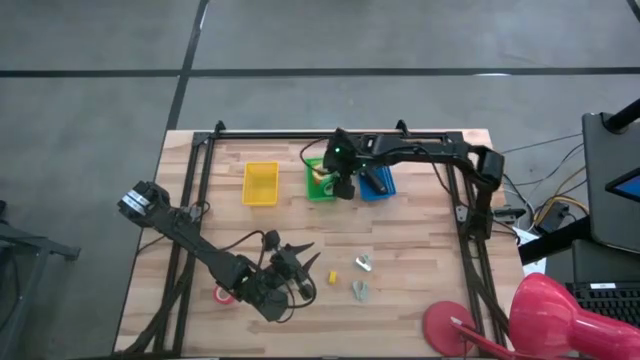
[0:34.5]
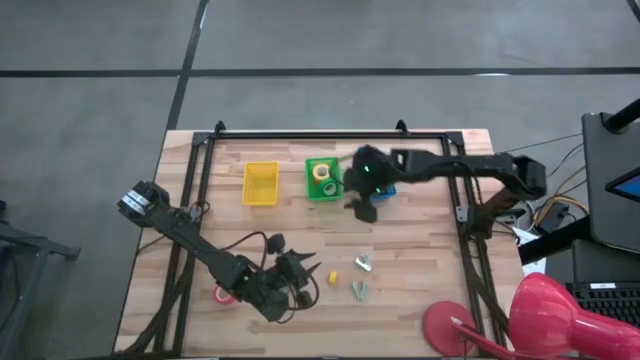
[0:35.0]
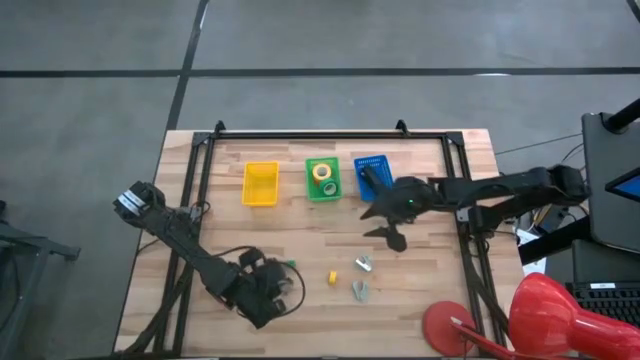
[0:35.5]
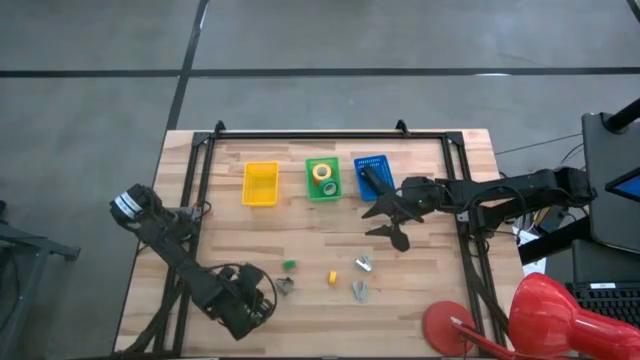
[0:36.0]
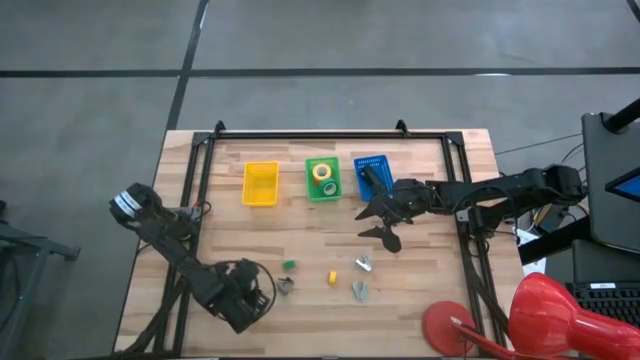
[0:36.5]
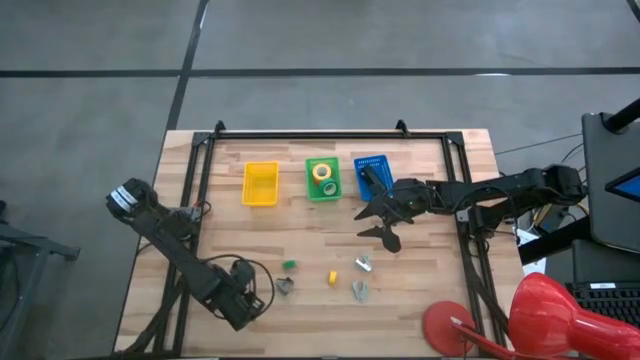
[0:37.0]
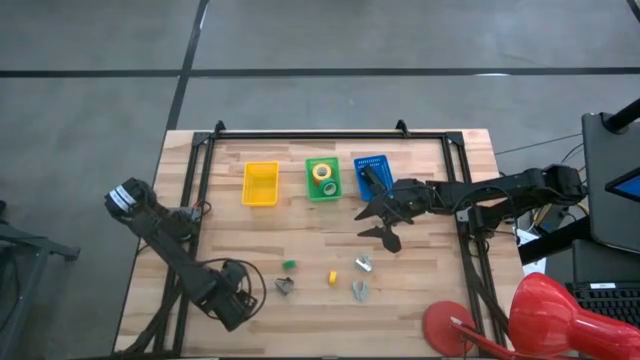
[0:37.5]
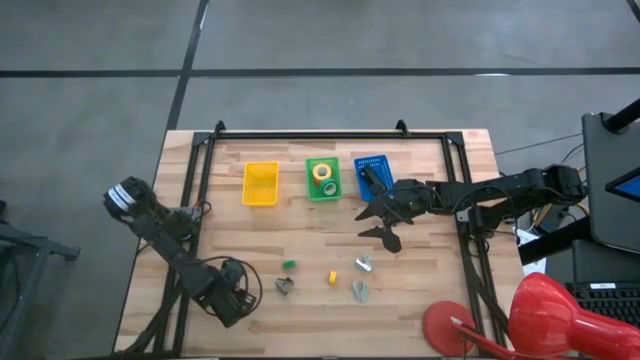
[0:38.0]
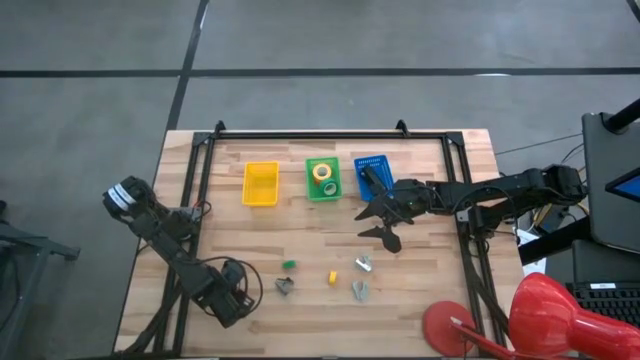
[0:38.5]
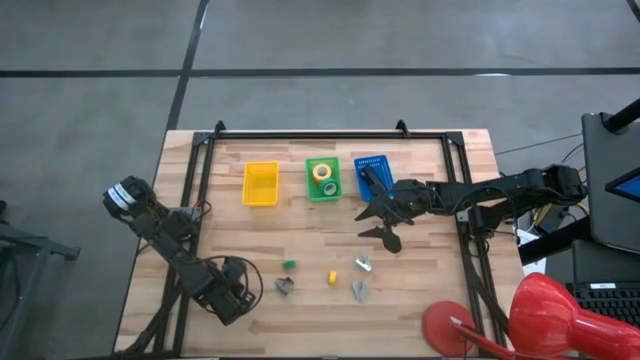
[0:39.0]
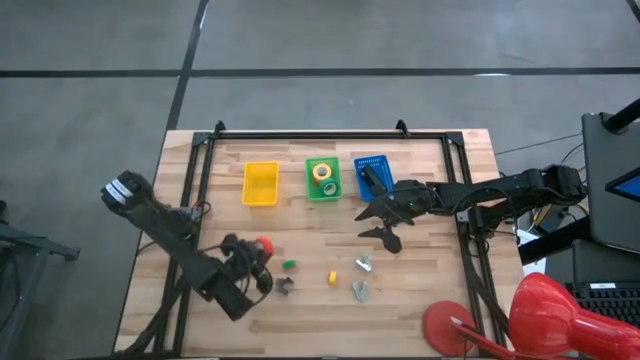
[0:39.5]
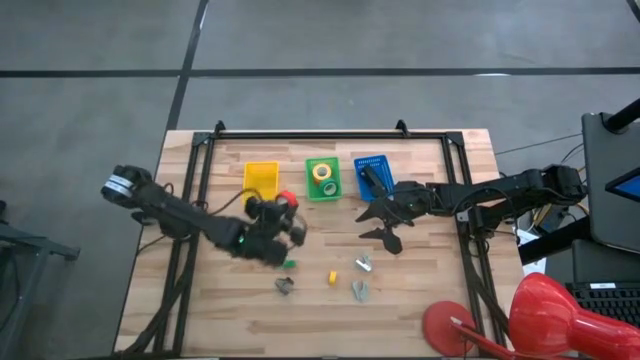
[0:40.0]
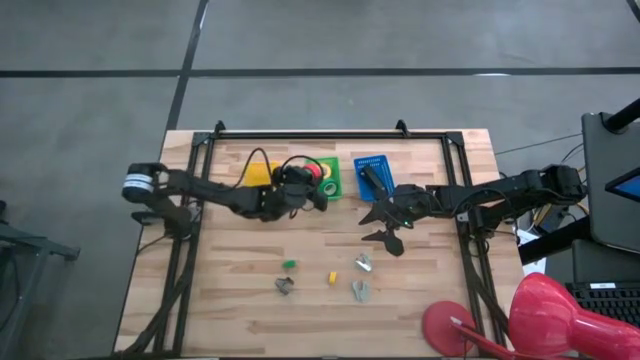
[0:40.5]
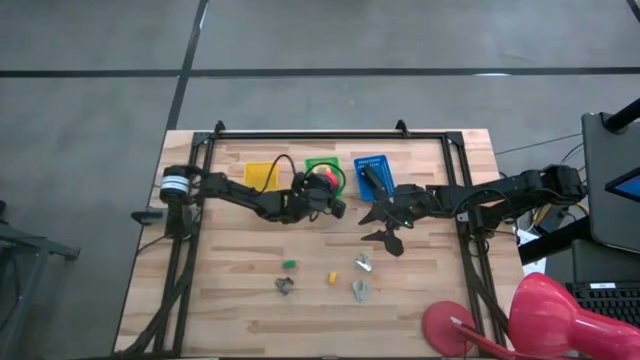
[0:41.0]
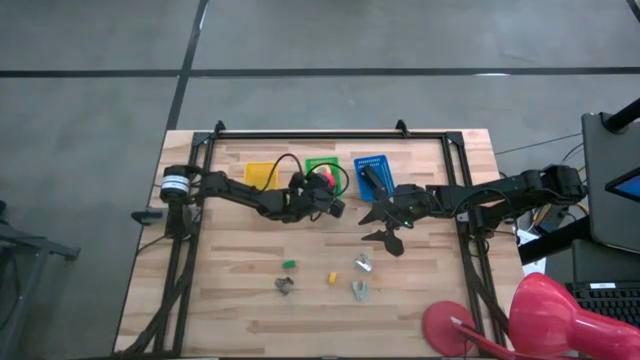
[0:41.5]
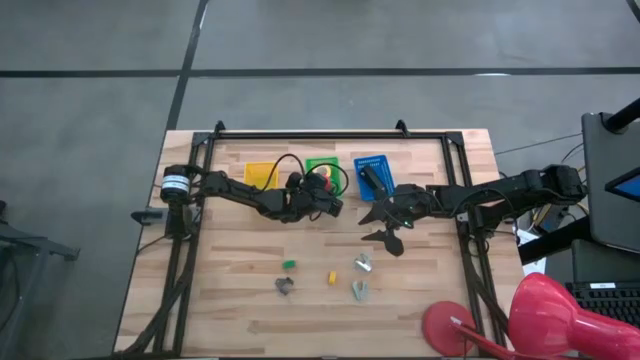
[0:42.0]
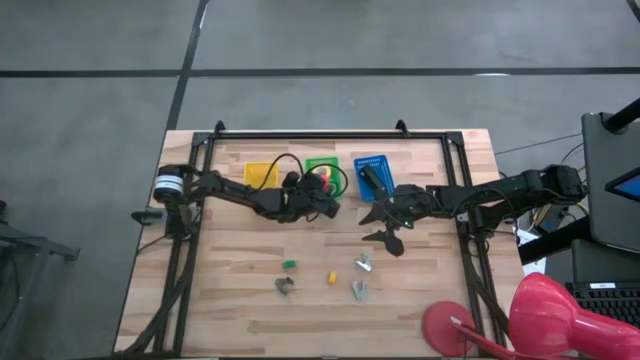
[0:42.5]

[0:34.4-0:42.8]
Task: Pick and place Stapler, Stapler remover, tape
Put the red tape into the green bin

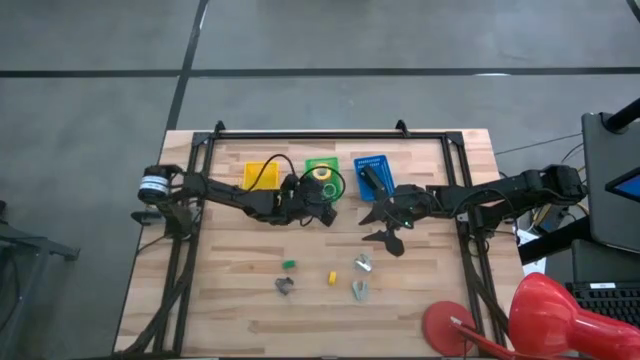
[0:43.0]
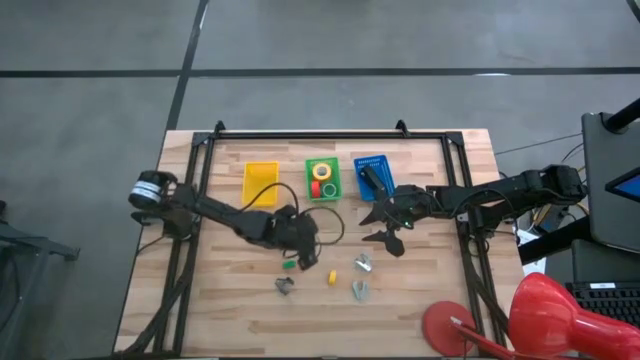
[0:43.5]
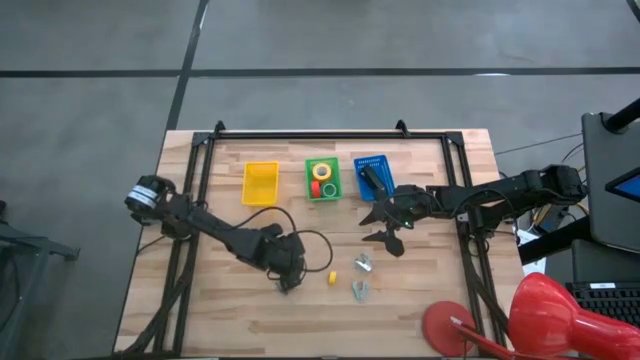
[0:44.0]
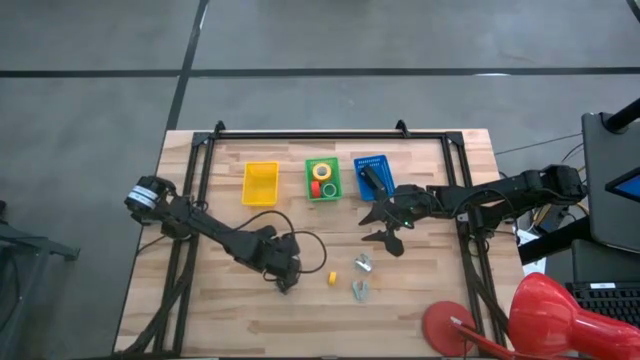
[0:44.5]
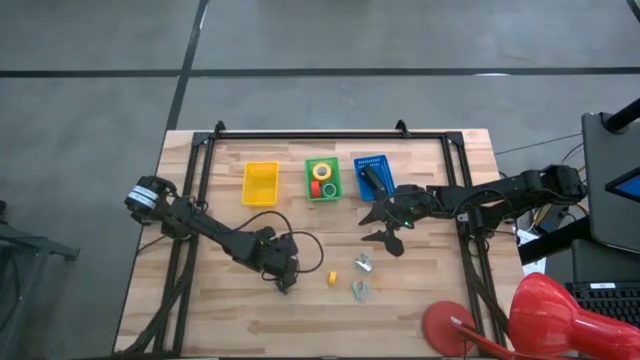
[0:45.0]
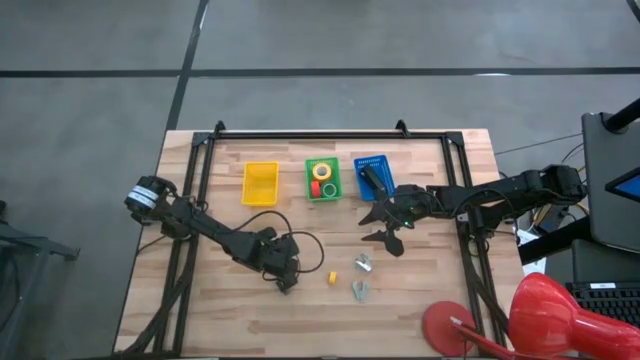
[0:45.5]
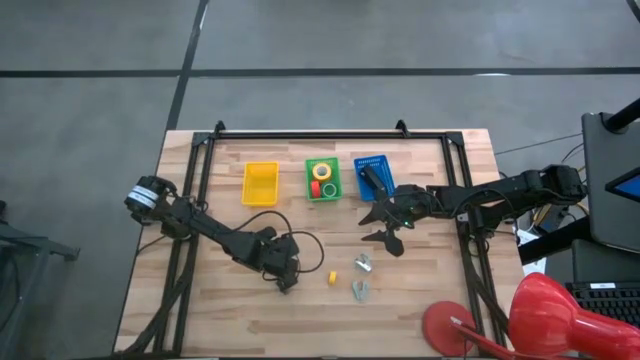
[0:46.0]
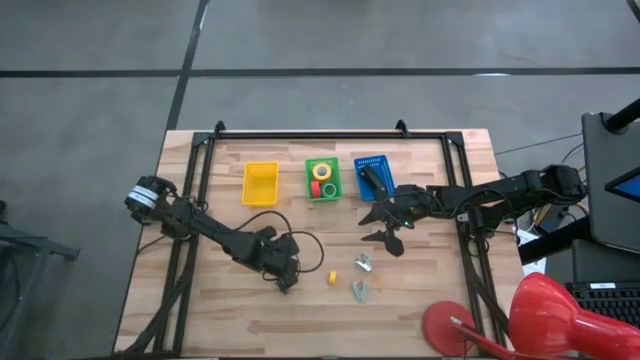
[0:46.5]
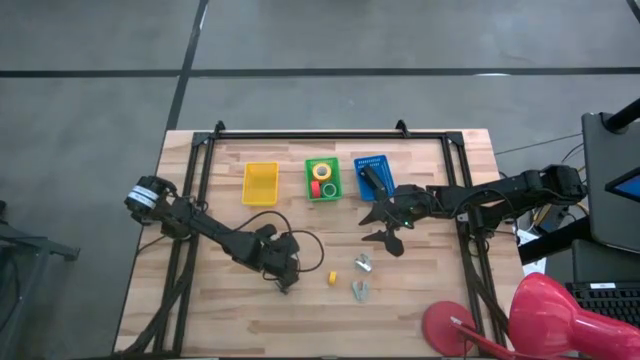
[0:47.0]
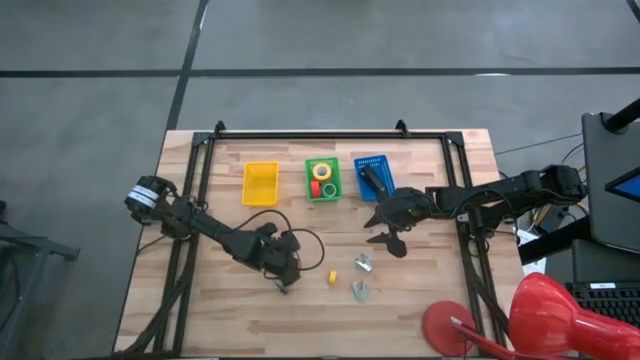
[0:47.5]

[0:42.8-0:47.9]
Put the small green stapler into the blue bin

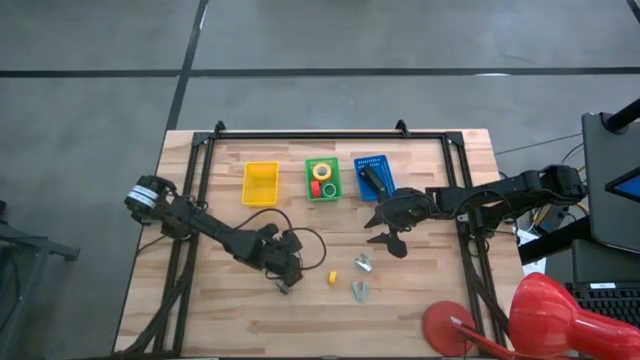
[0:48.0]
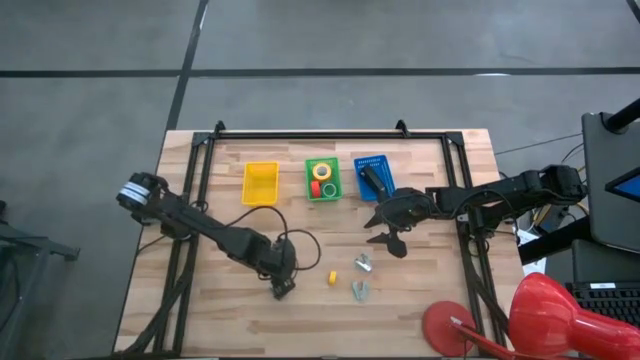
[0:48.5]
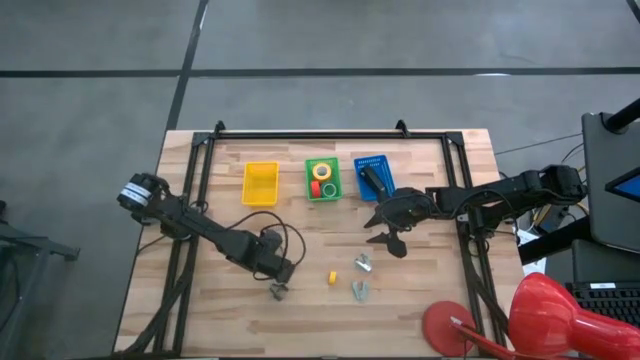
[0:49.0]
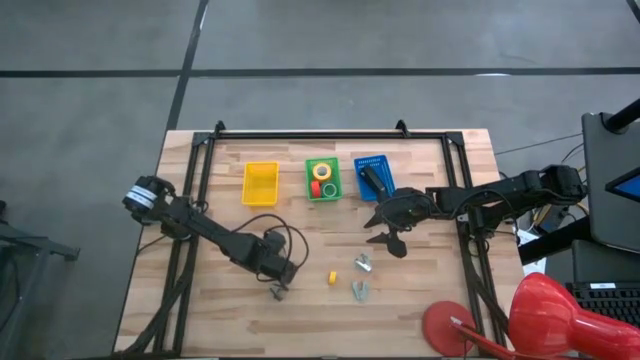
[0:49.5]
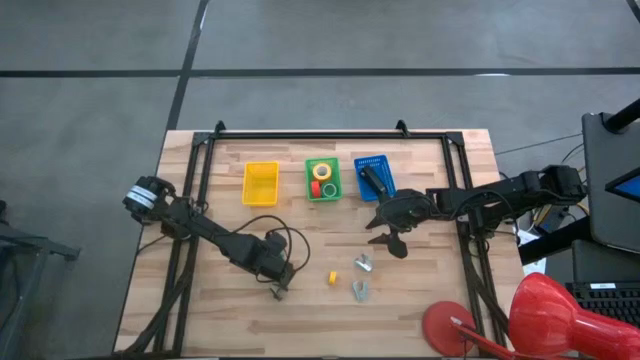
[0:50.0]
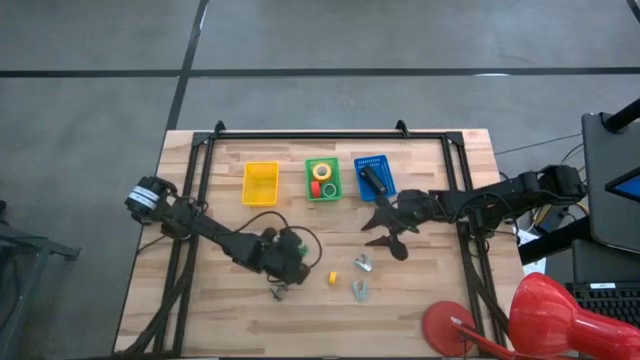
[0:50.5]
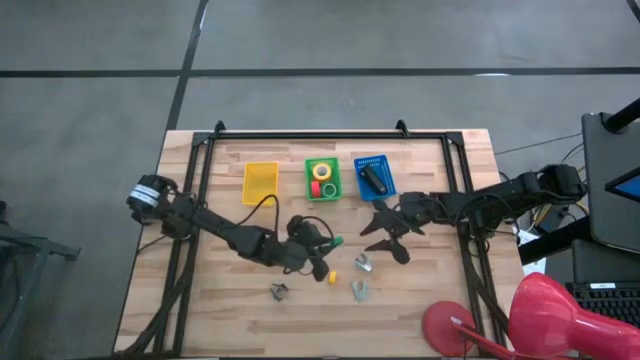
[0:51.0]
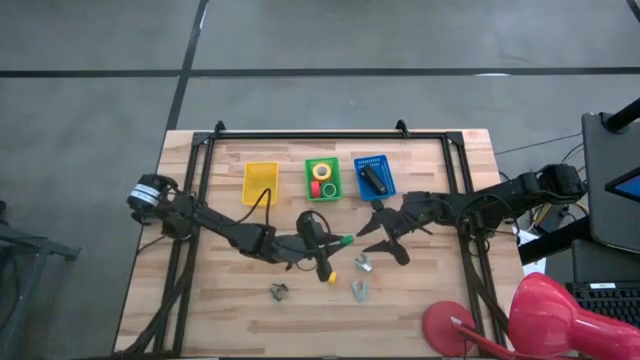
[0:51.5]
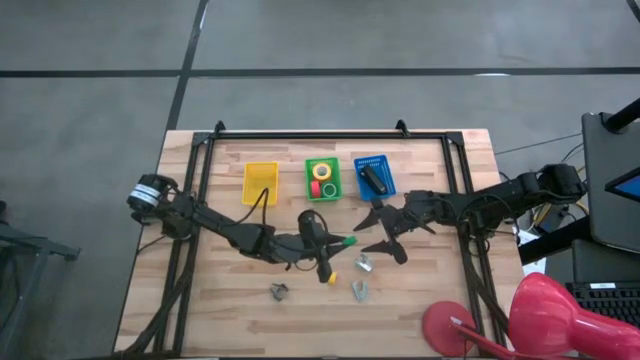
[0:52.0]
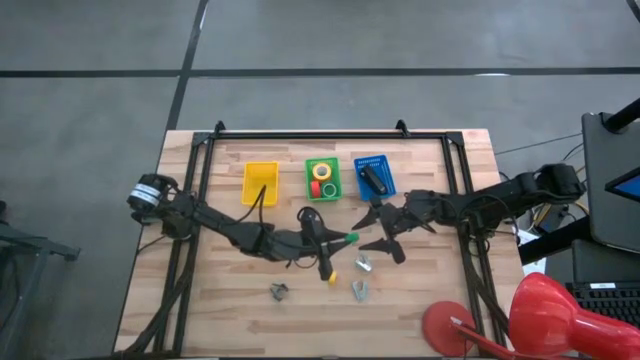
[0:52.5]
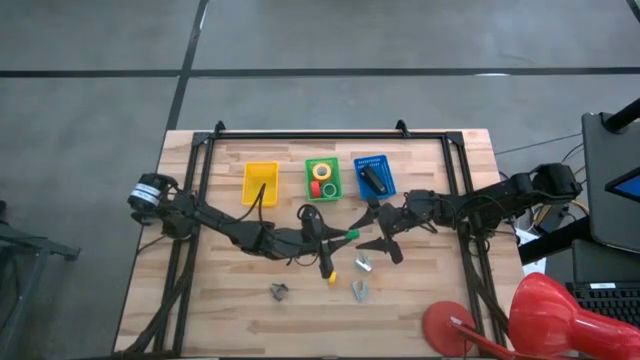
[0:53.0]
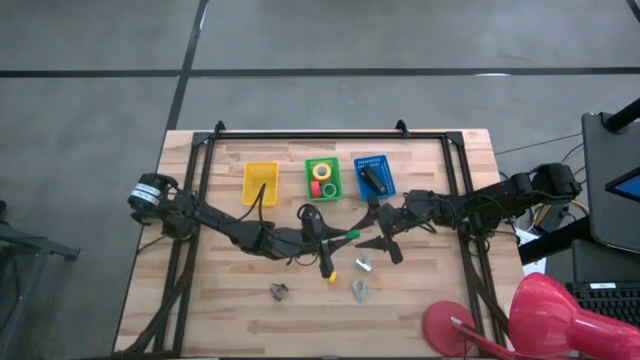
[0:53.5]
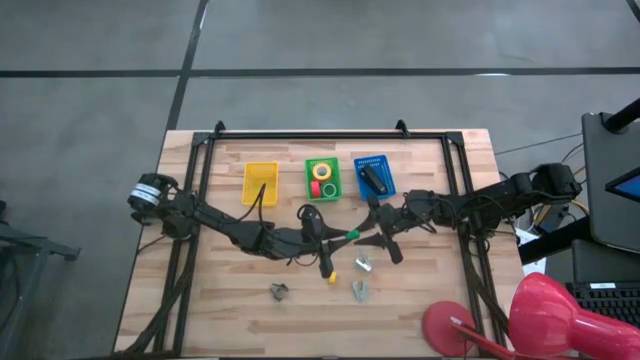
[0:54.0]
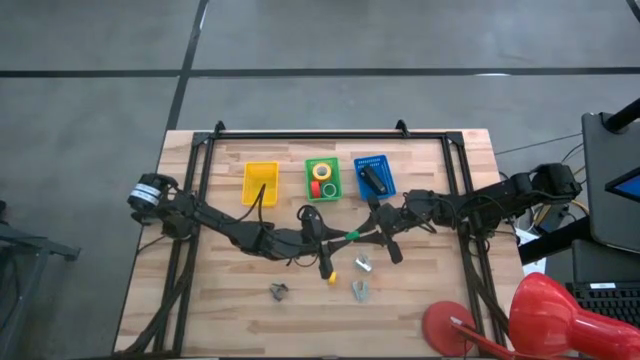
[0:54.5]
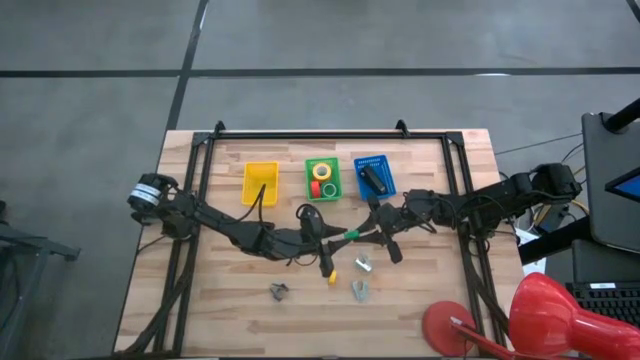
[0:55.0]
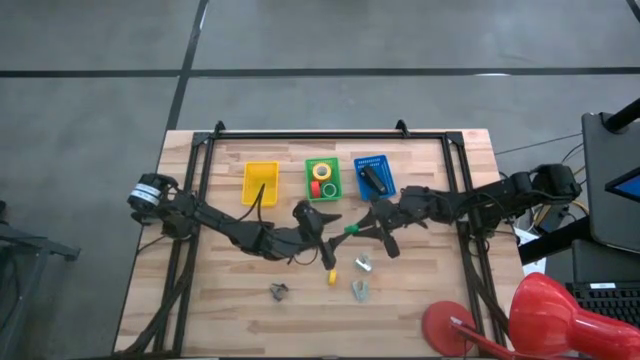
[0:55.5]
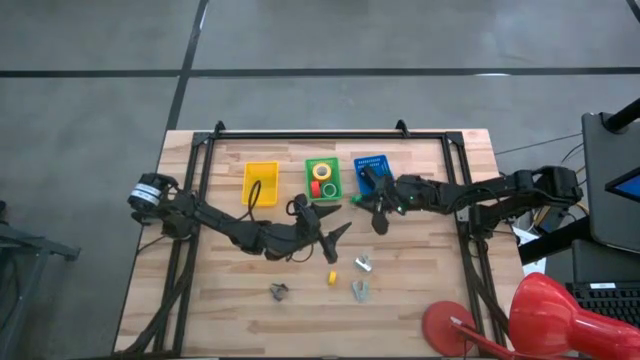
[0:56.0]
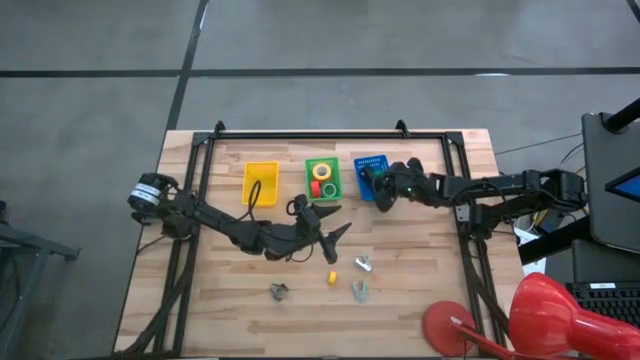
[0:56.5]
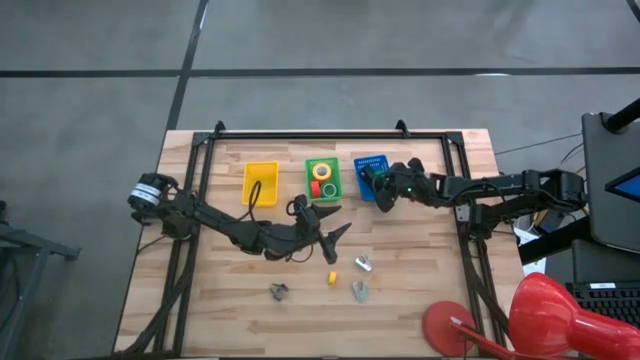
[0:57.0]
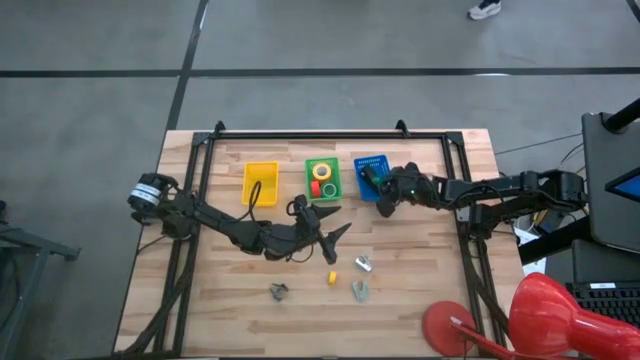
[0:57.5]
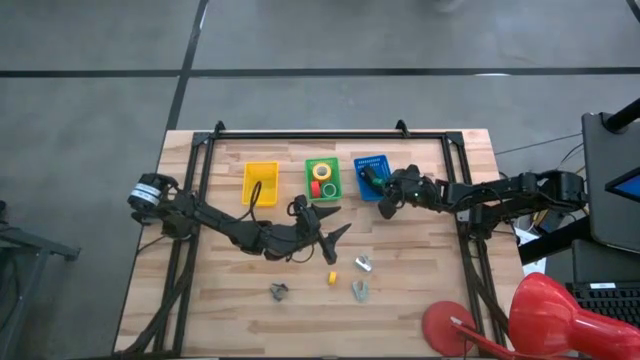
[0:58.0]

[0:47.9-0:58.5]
Put the small green stapler into the blue bin
